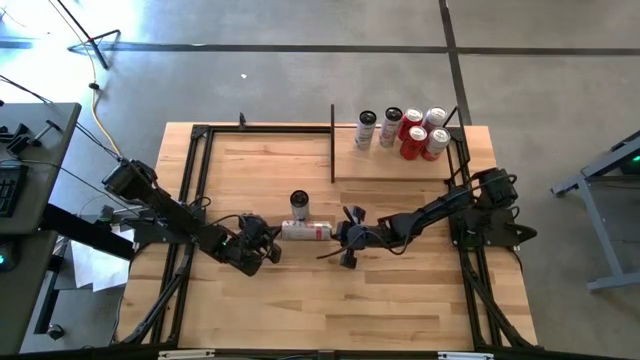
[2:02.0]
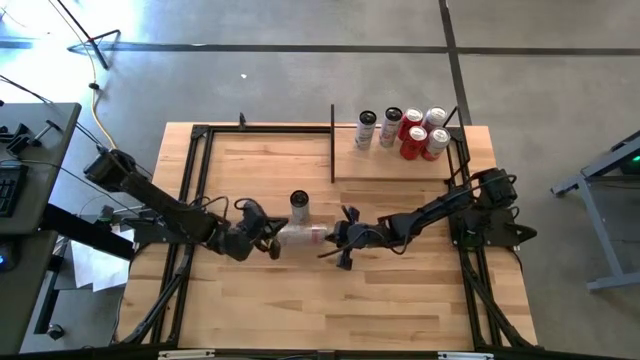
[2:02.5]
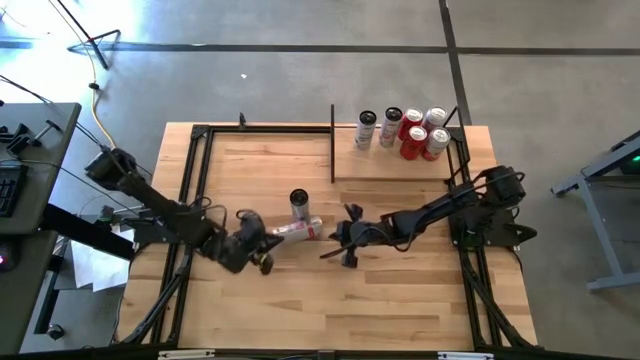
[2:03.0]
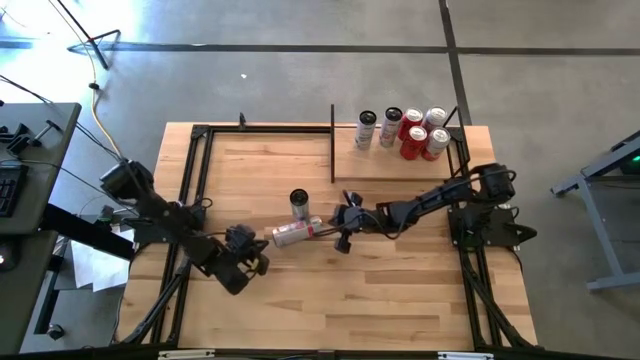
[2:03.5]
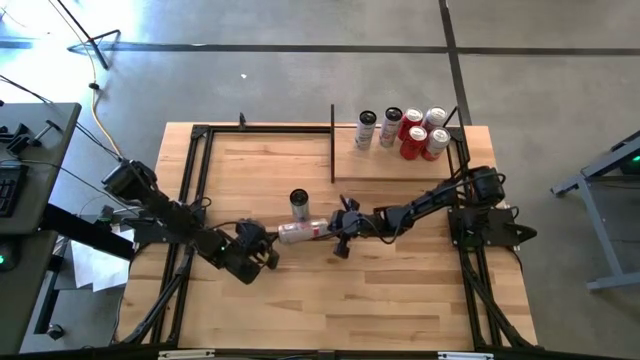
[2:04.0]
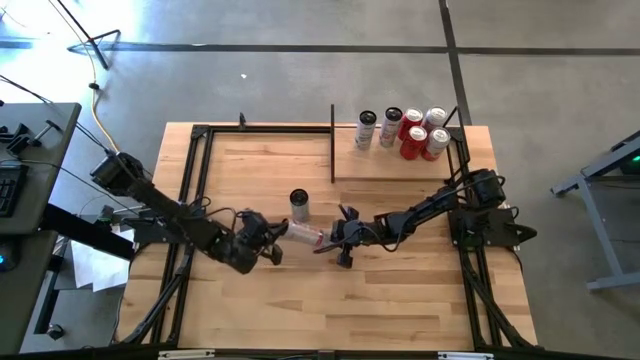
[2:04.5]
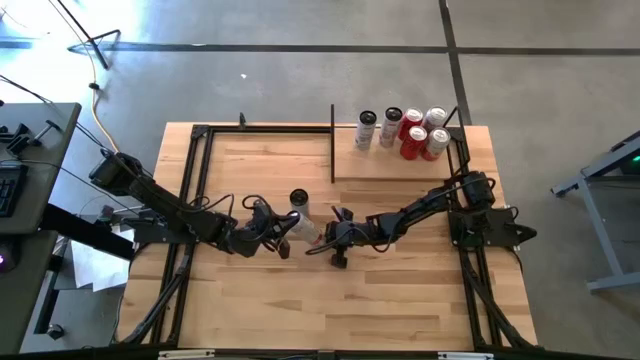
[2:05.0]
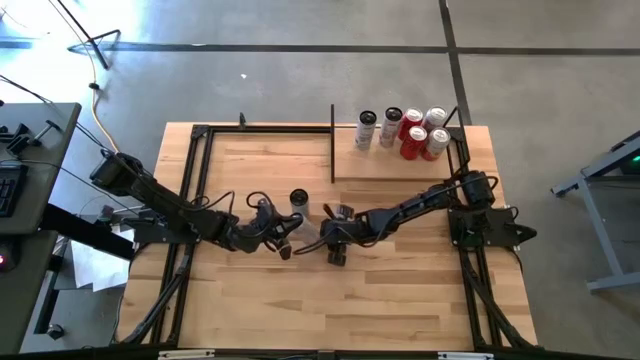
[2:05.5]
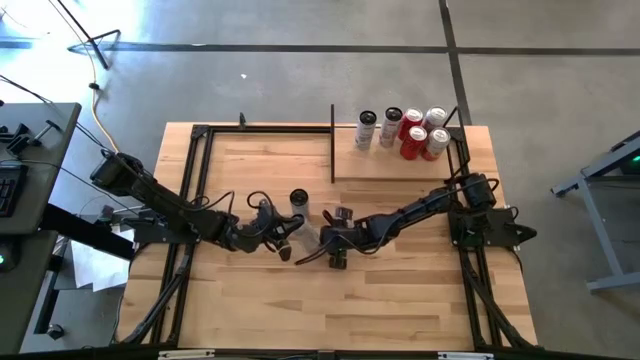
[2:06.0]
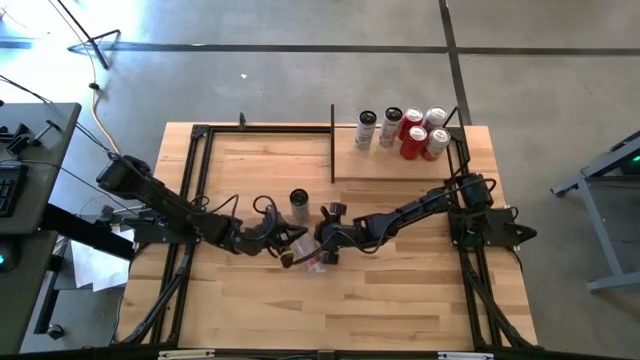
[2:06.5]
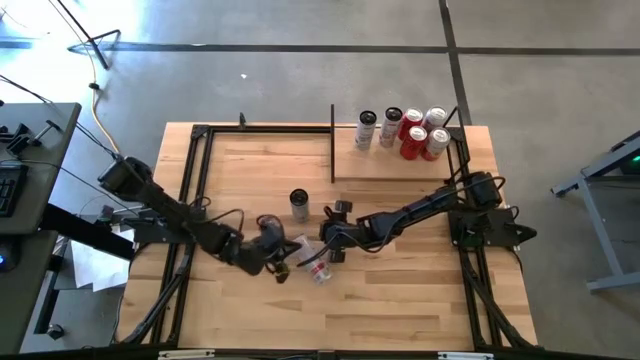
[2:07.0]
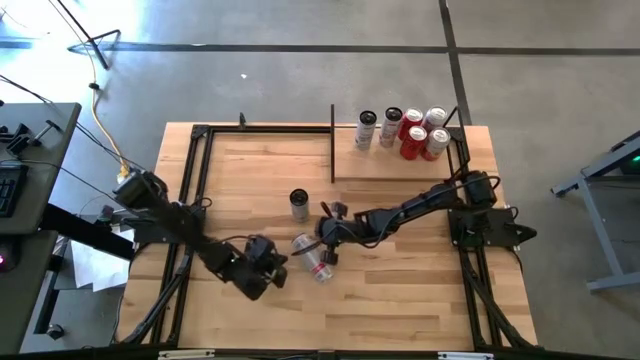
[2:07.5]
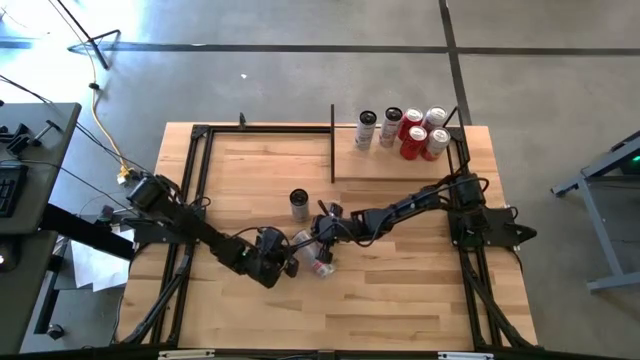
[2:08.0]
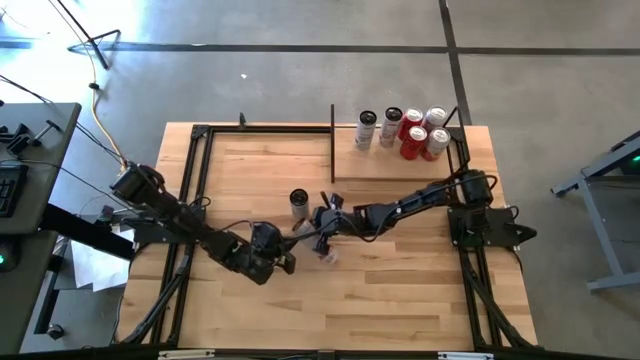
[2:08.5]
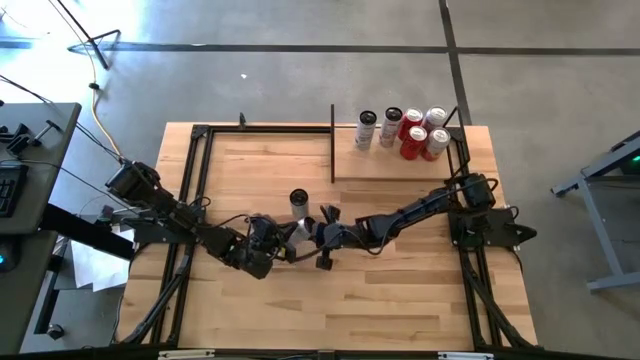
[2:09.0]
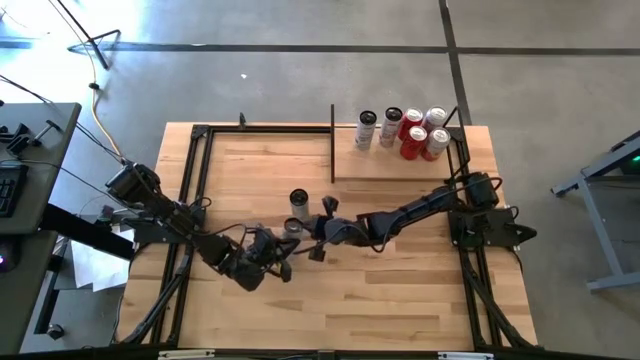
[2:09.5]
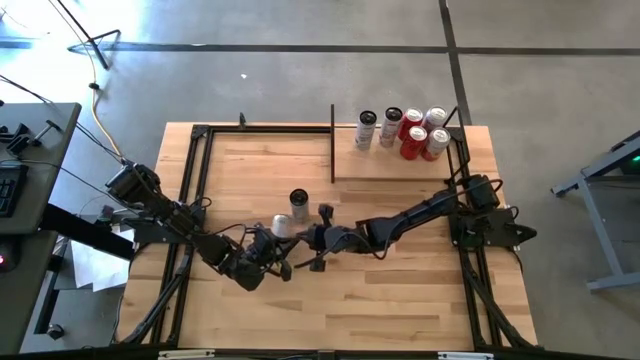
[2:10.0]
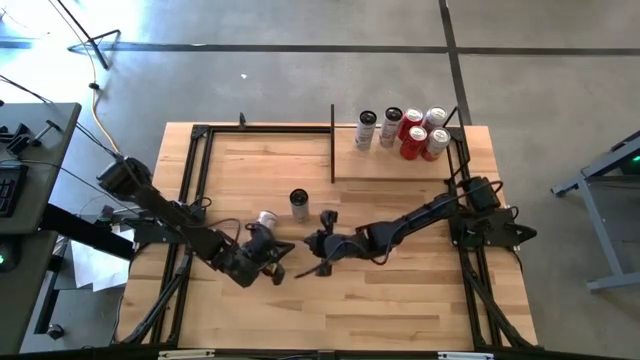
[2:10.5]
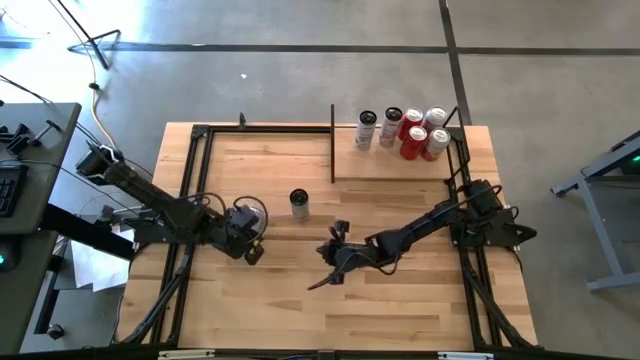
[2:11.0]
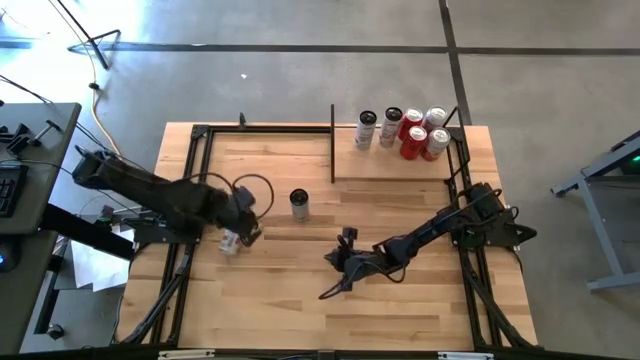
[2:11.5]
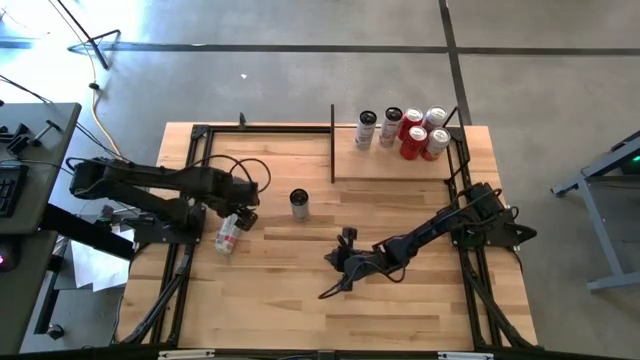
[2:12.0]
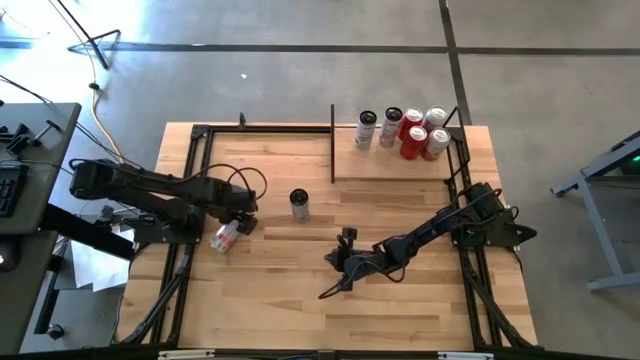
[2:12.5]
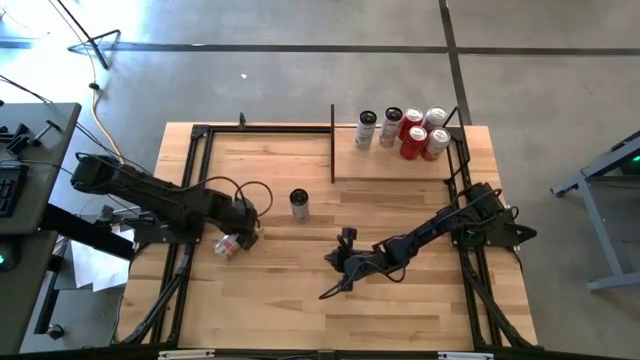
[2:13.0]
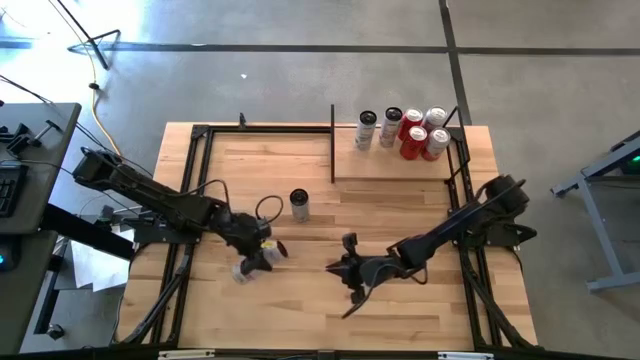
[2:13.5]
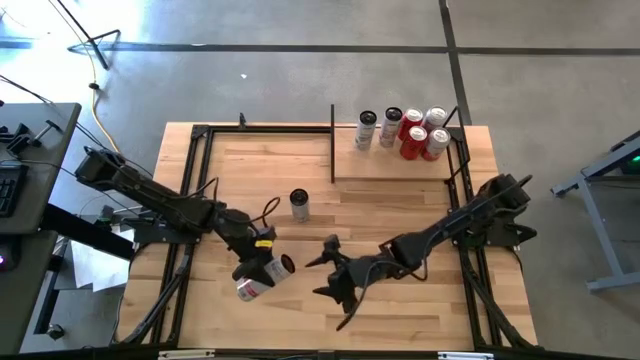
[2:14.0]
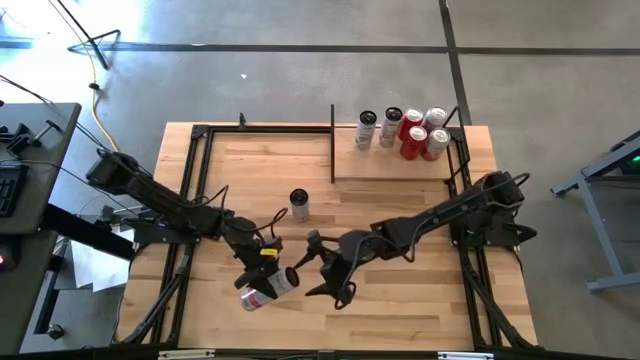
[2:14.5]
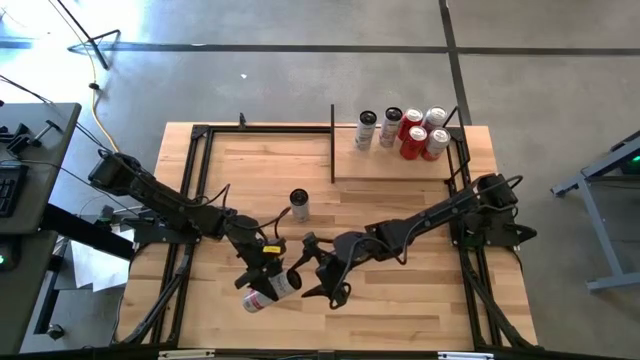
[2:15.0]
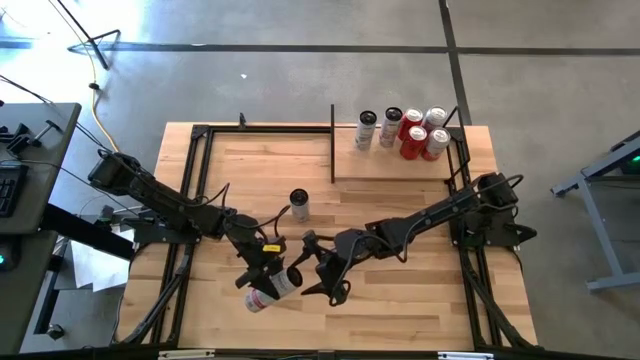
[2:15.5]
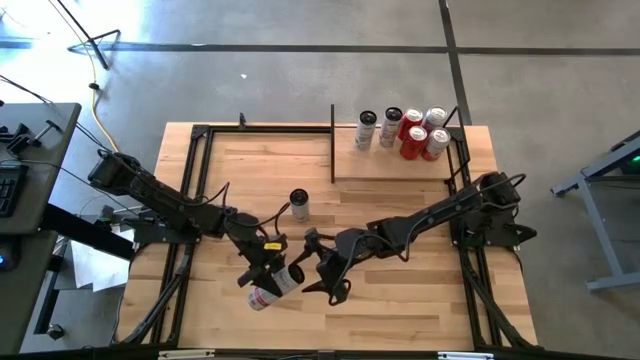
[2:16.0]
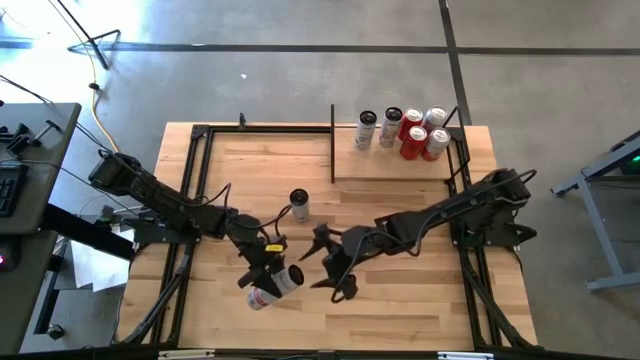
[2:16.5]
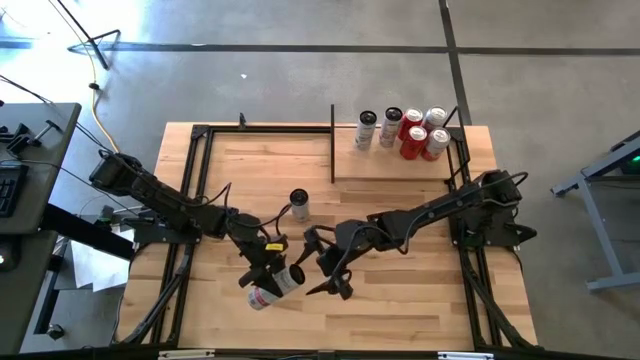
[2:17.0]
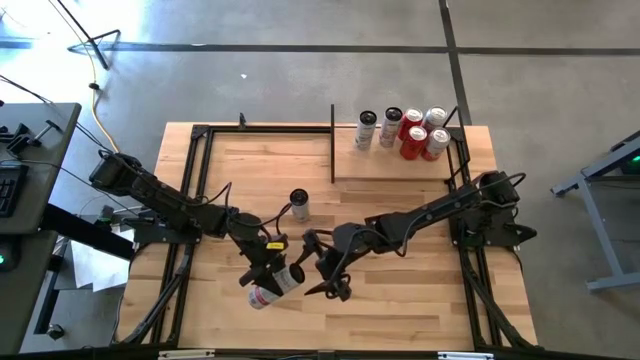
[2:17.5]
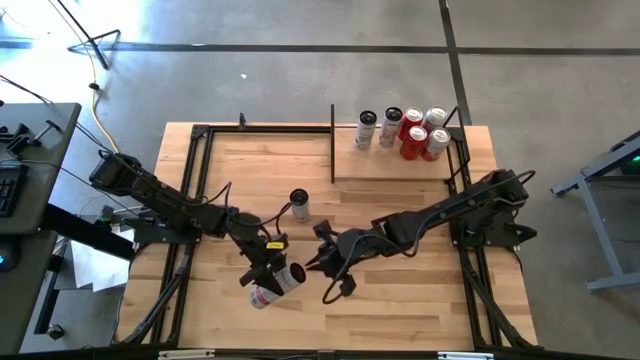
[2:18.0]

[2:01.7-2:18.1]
Task: Place canned beverage on shelf
Put the peach vibe soda can on the shelf aligned with the other peach vibe soda can

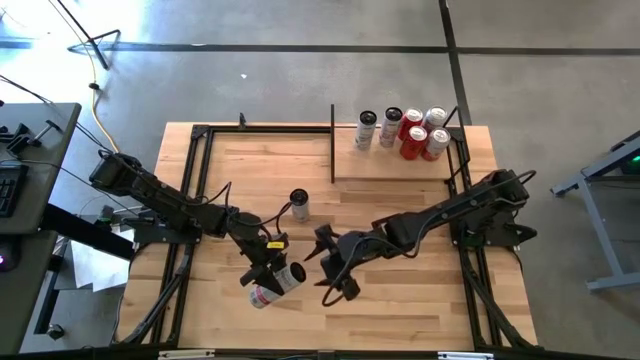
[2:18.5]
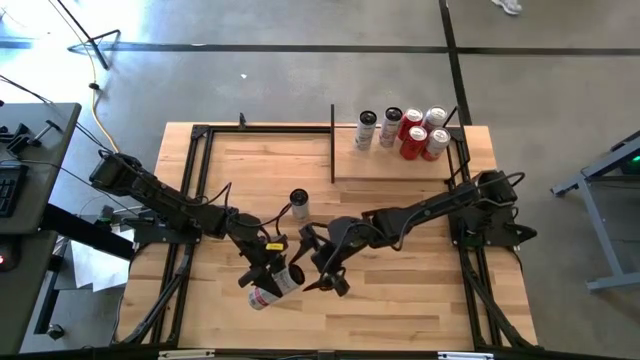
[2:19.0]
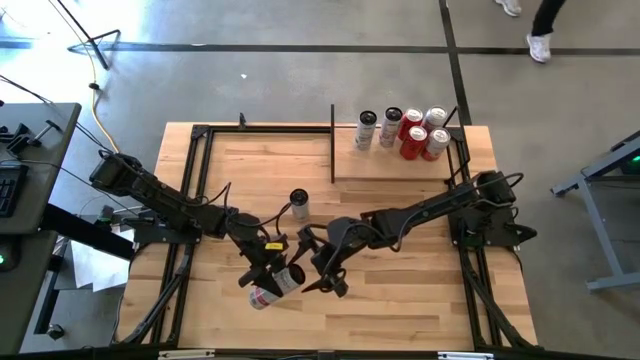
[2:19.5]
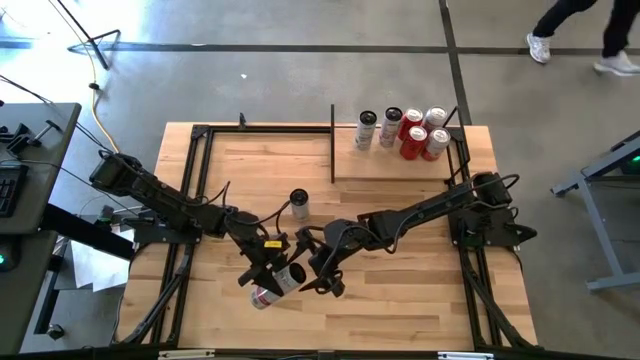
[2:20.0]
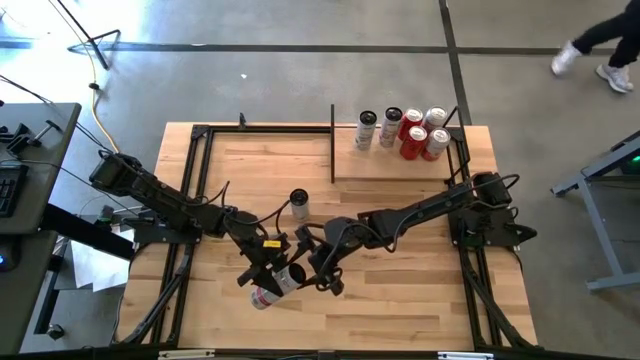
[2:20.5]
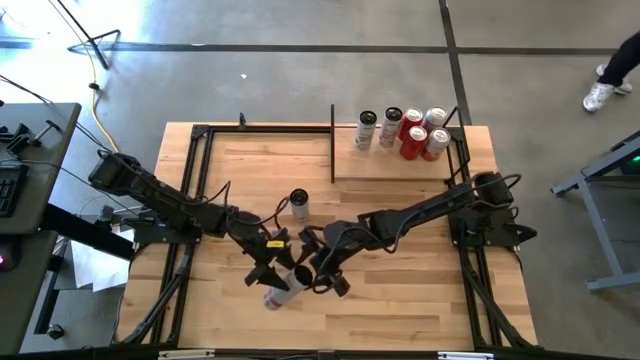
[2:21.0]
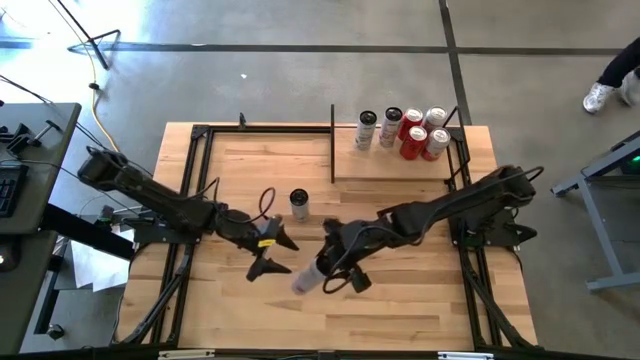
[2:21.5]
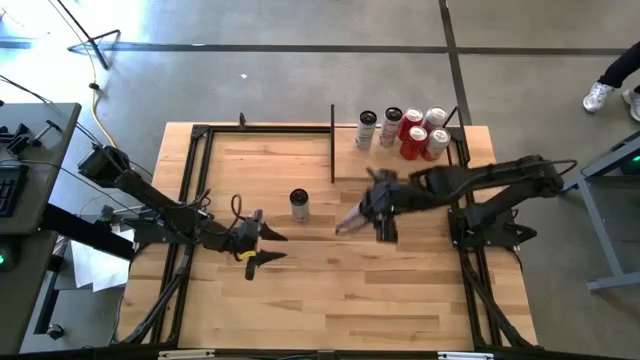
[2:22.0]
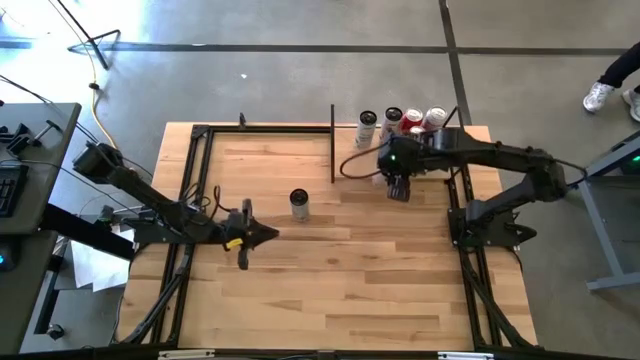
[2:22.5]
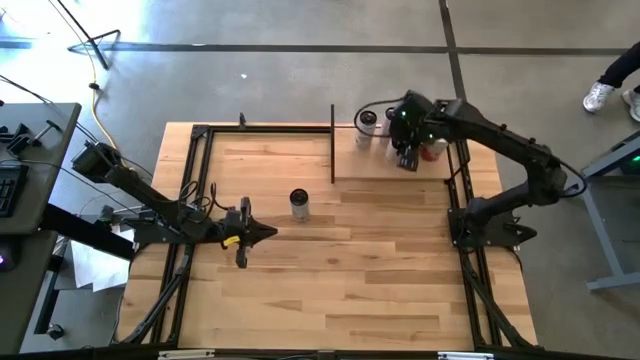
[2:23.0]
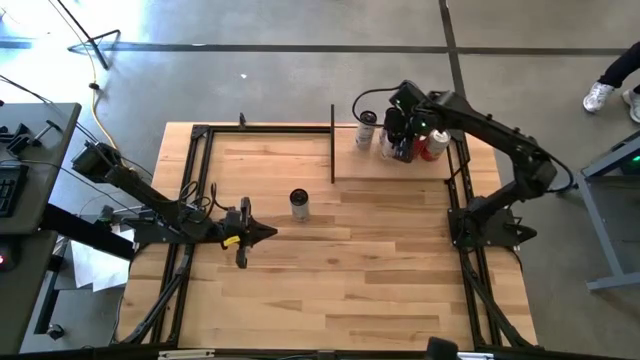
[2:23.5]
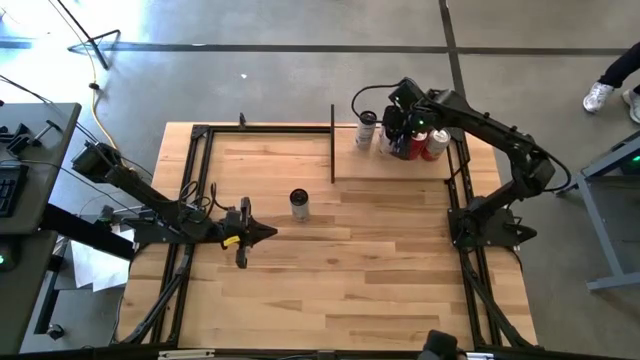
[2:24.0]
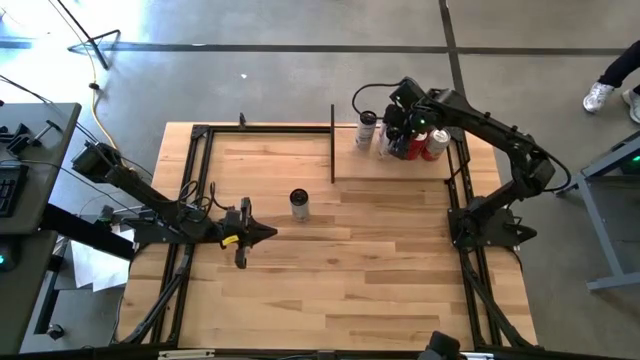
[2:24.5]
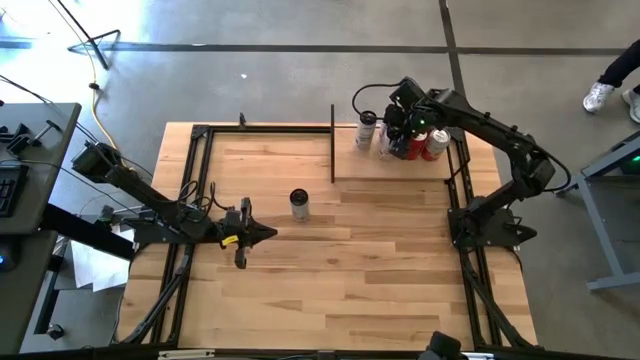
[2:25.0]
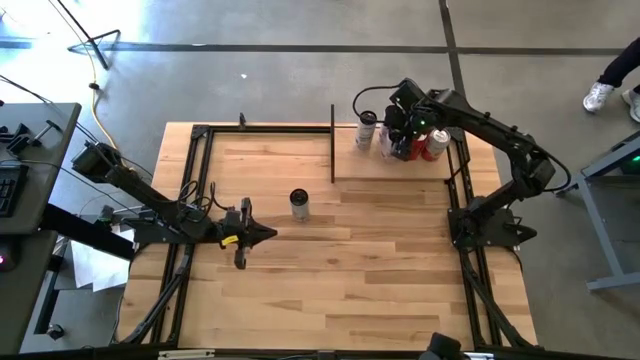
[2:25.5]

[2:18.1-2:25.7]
Put the peach vibe soda can on the shelf aligned with the other peach vibe soda can
